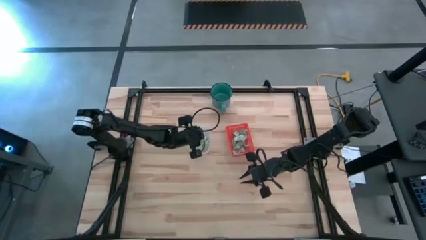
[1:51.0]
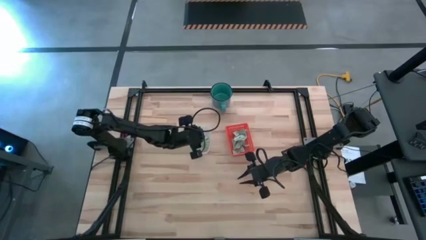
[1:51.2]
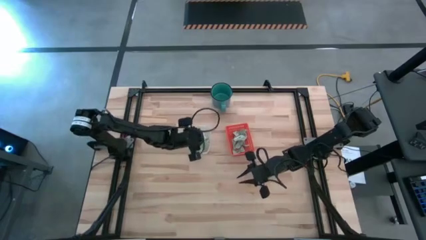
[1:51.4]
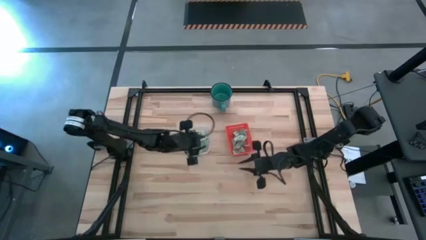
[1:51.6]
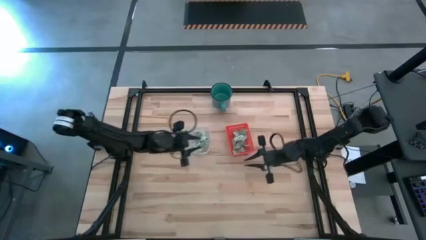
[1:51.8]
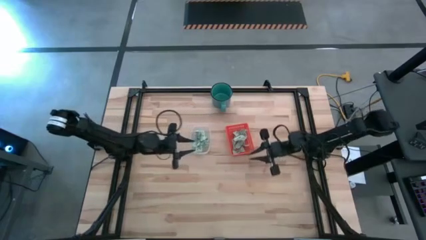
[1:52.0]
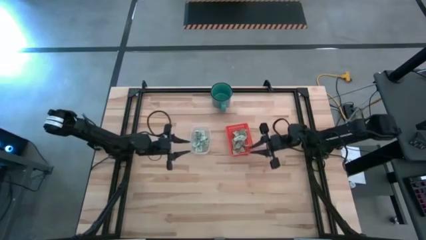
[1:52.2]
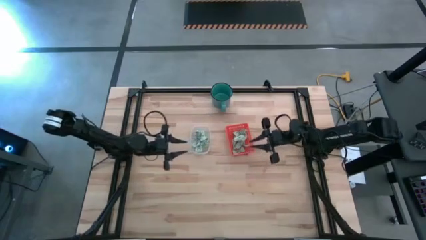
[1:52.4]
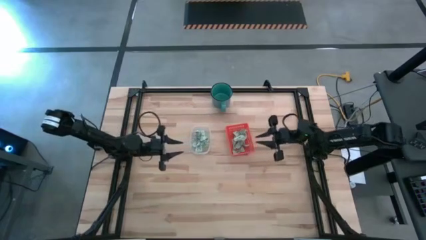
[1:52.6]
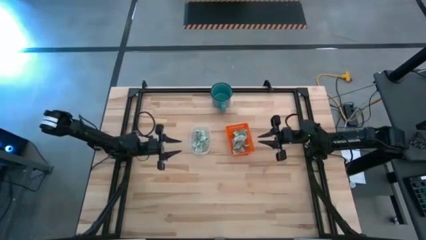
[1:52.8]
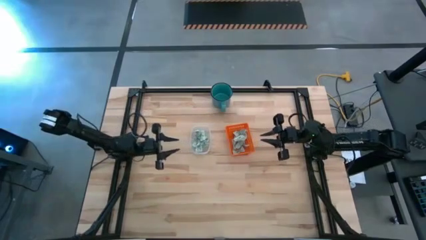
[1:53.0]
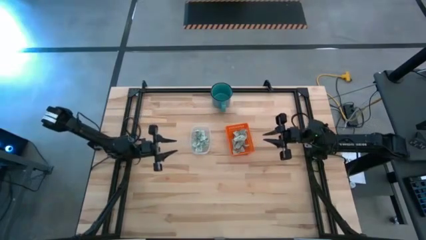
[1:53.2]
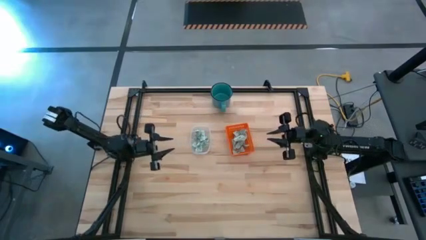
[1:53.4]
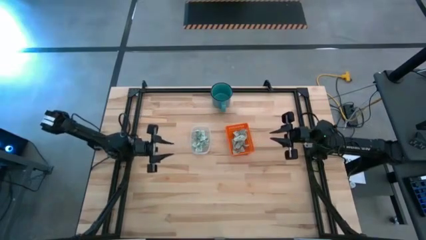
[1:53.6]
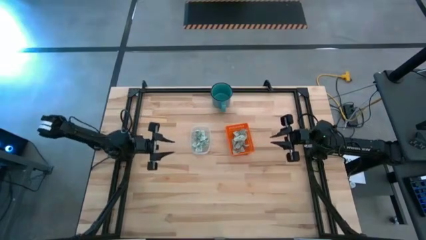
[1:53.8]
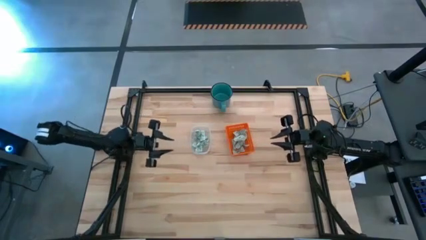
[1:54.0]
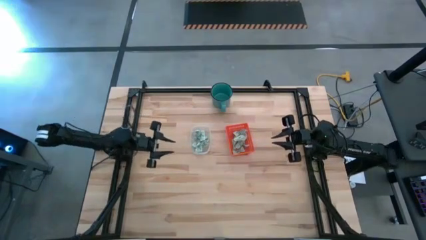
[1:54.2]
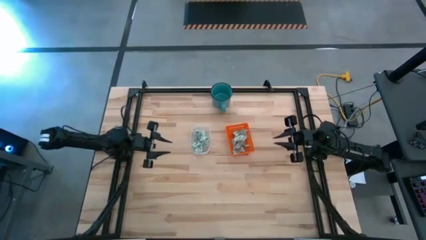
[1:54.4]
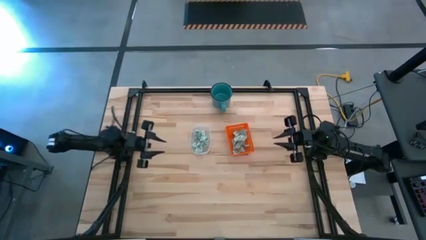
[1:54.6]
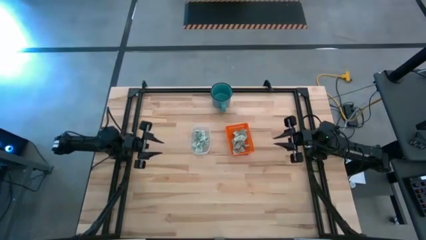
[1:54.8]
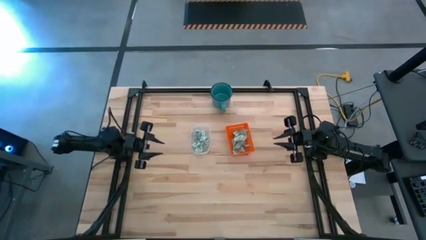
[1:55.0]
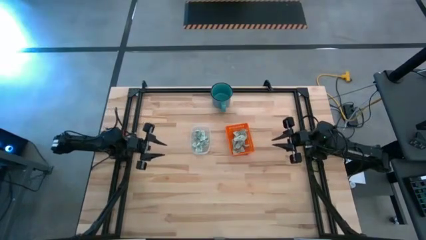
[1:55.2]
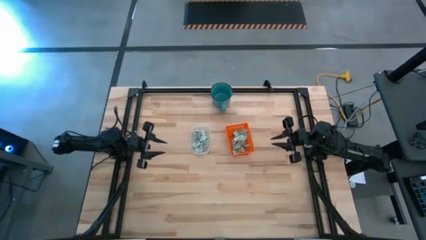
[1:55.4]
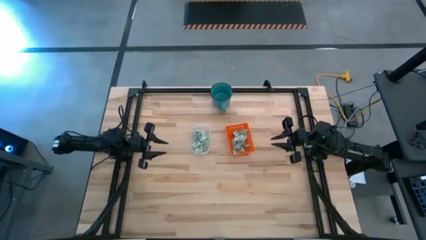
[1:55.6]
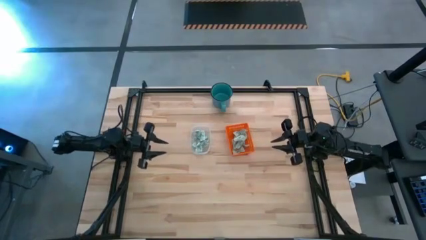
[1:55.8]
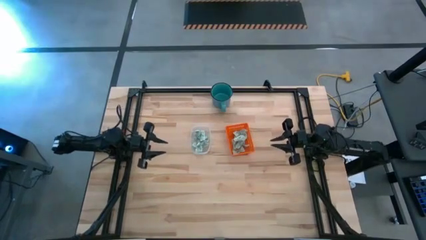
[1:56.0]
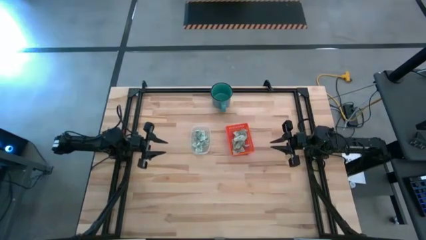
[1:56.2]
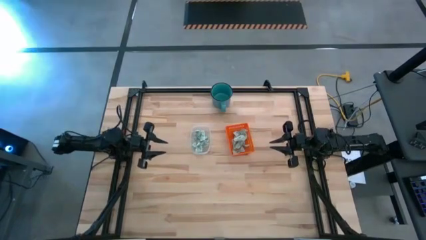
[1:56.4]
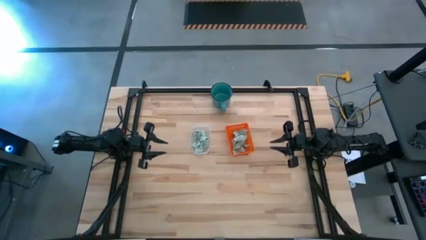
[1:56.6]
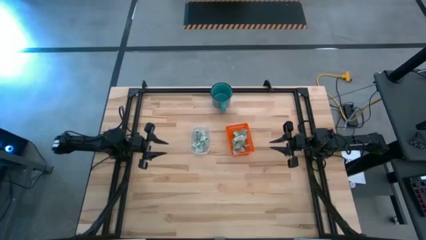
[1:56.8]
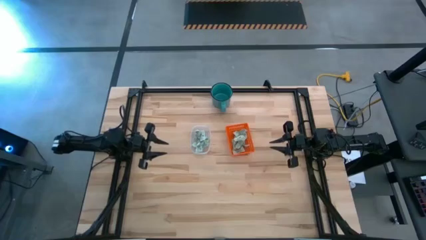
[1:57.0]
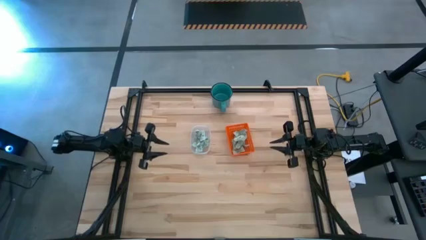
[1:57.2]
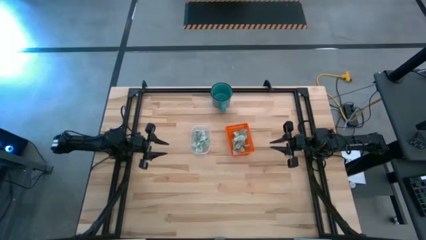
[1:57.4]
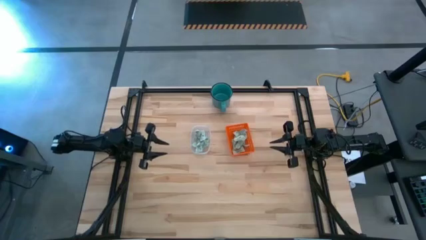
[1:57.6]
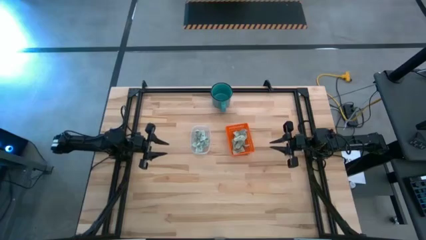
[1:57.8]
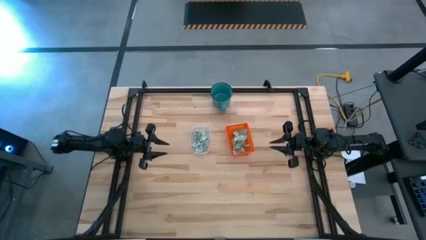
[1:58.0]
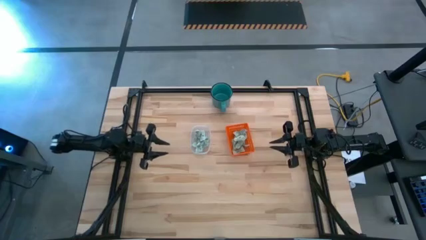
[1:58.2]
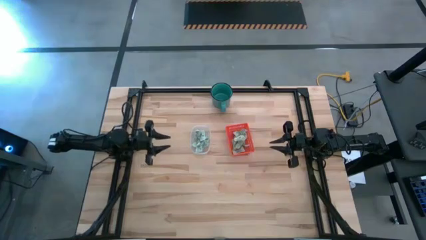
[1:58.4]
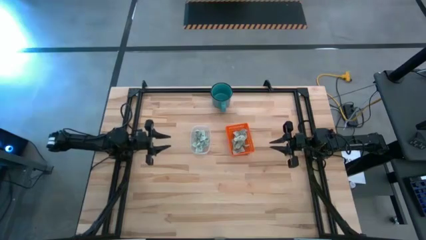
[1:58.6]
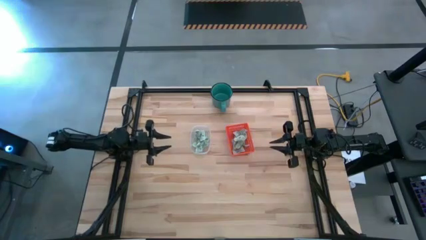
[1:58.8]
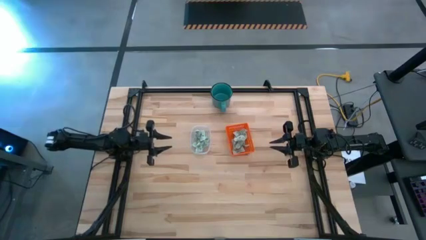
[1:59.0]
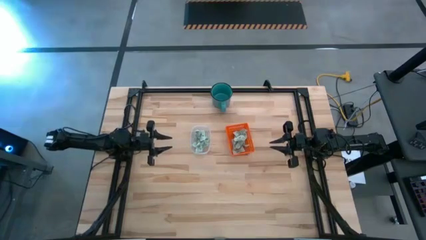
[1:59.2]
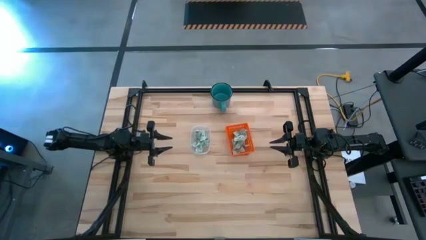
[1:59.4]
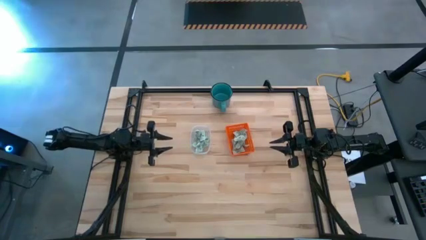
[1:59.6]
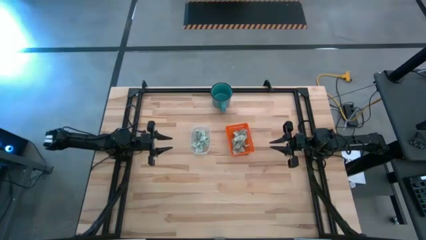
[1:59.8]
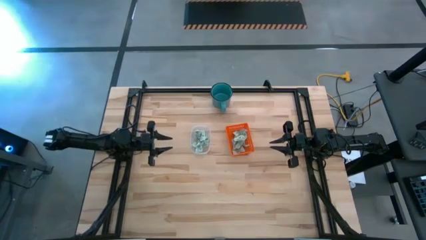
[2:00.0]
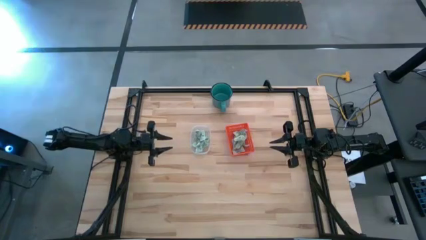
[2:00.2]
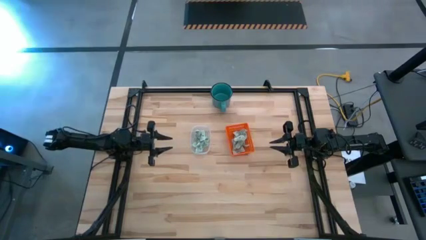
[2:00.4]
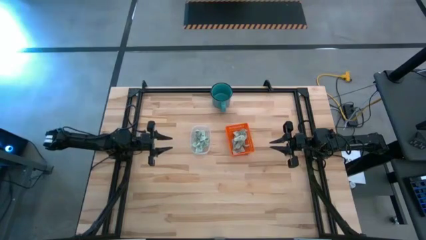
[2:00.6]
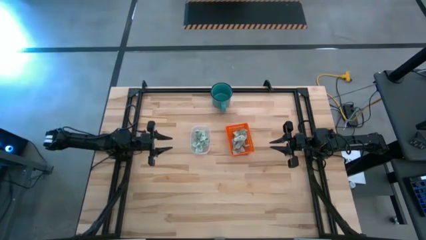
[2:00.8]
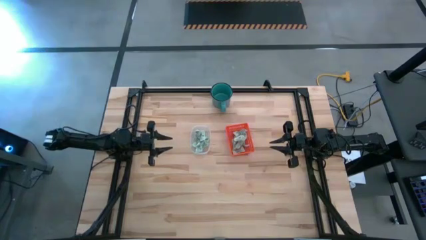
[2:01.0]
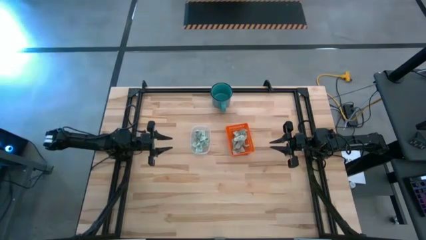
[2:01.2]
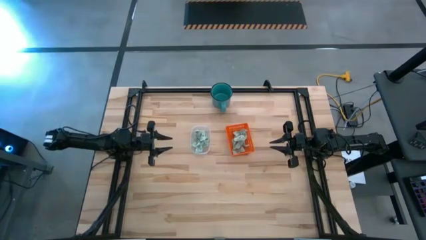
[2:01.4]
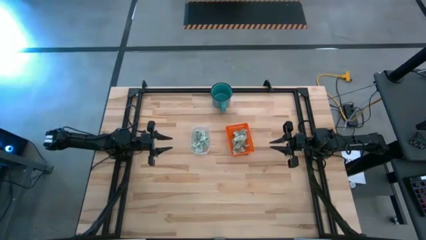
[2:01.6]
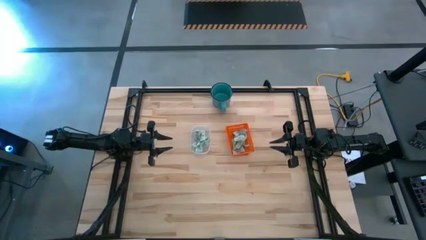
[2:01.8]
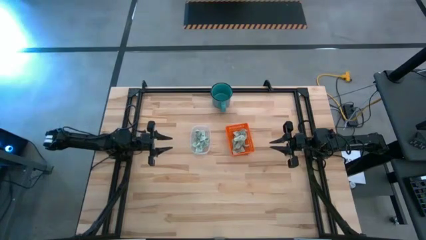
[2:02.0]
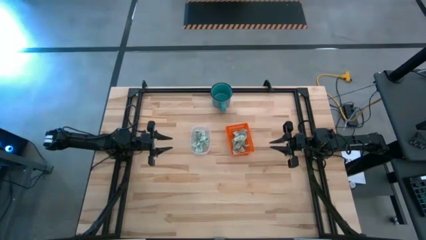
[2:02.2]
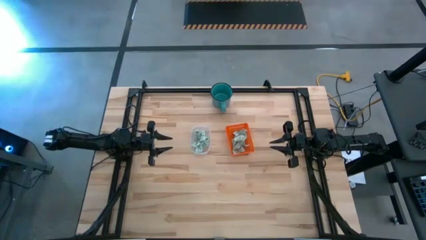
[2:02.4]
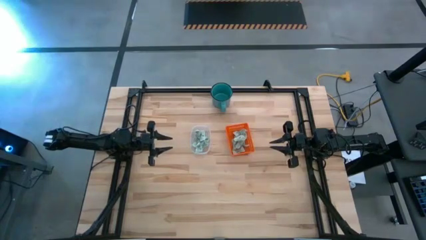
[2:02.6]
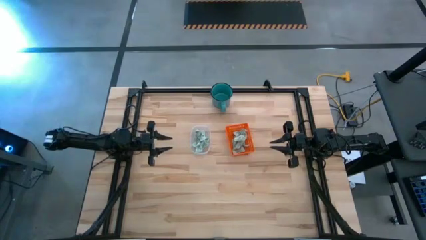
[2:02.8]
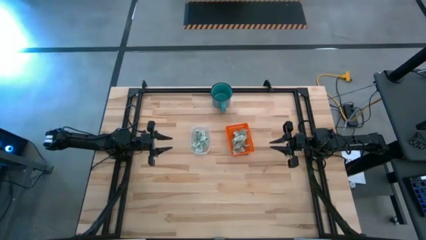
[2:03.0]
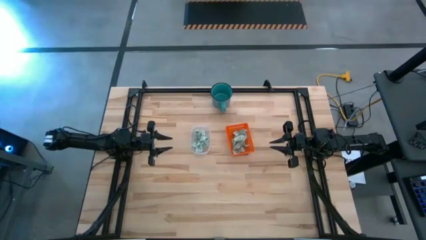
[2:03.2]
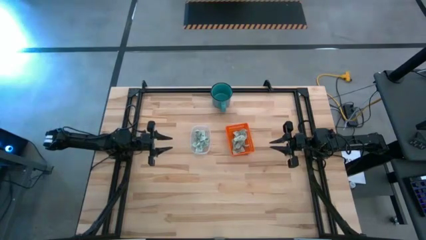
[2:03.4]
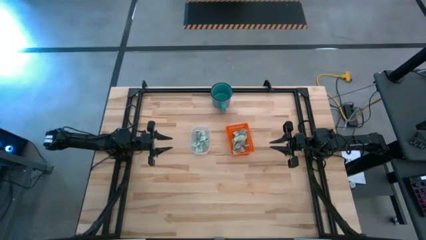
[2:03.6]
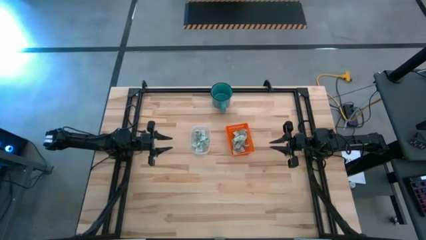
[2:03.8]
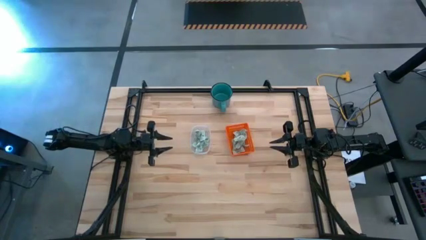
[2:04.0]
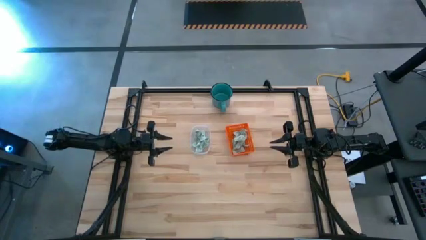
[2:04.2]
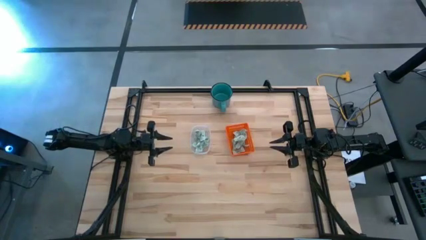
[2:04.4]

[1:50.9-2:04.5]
Task: Pick and place items into bin
Return to Home Position

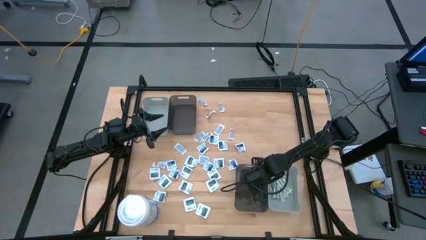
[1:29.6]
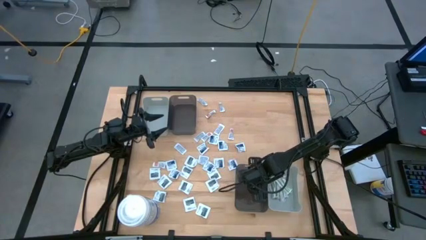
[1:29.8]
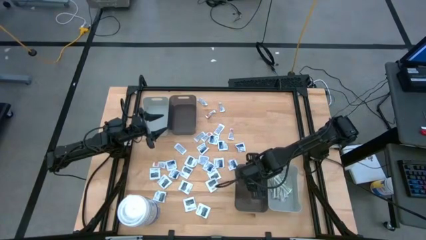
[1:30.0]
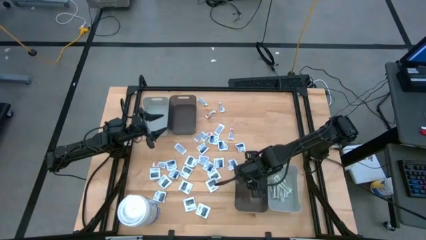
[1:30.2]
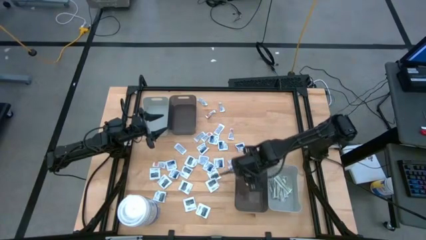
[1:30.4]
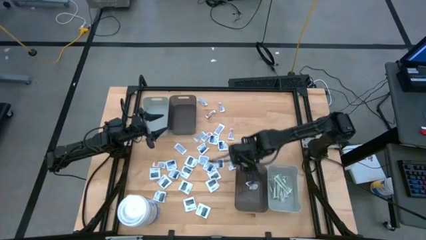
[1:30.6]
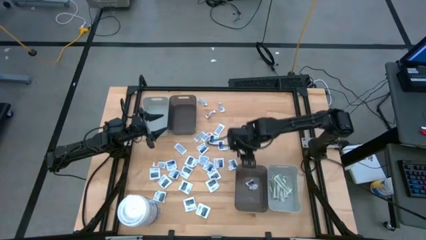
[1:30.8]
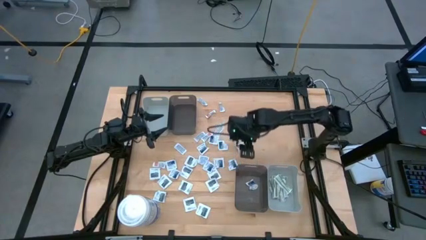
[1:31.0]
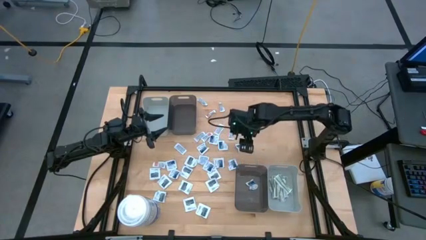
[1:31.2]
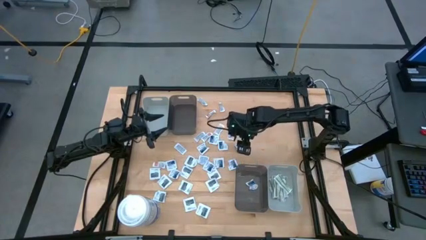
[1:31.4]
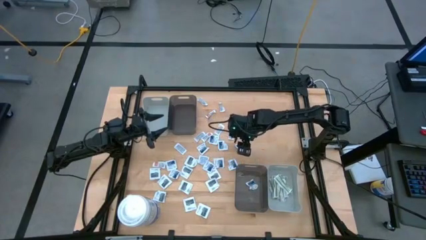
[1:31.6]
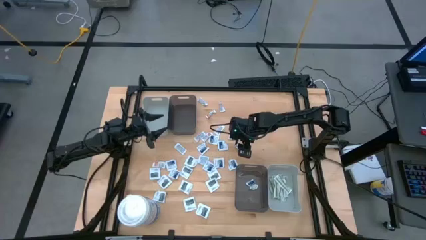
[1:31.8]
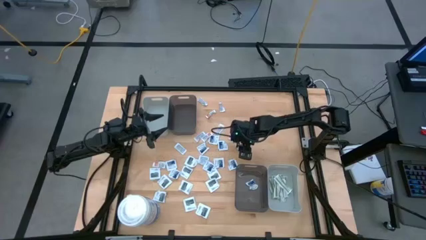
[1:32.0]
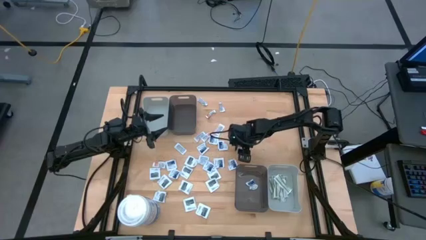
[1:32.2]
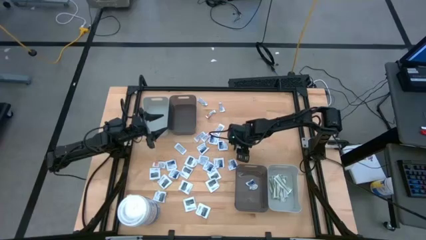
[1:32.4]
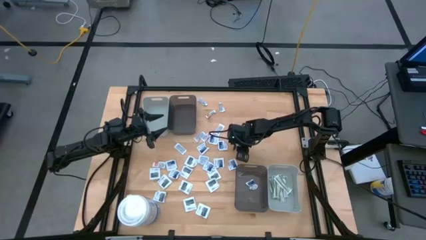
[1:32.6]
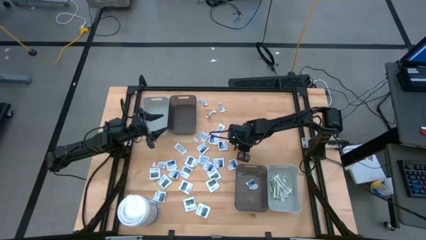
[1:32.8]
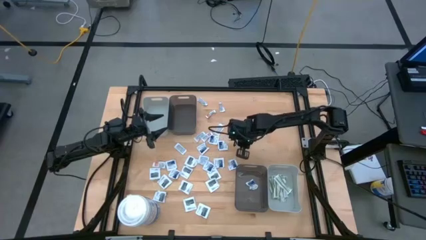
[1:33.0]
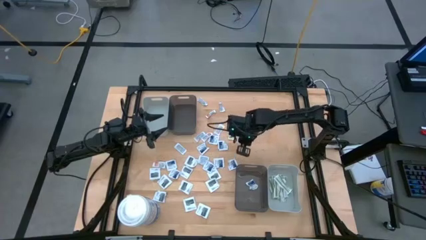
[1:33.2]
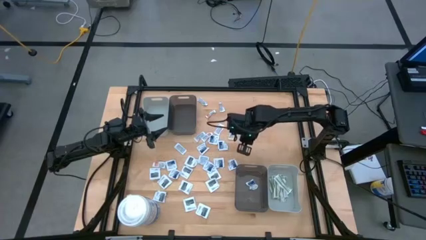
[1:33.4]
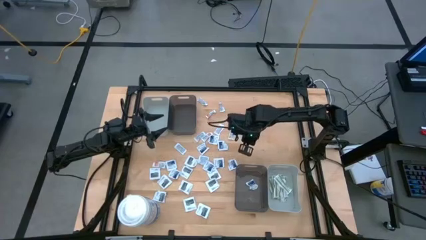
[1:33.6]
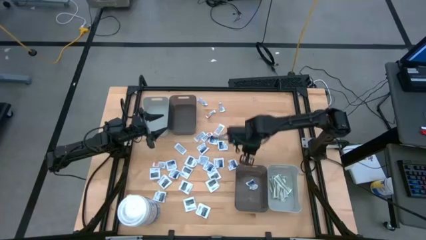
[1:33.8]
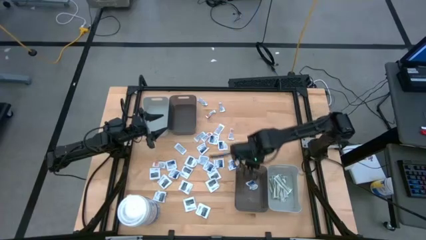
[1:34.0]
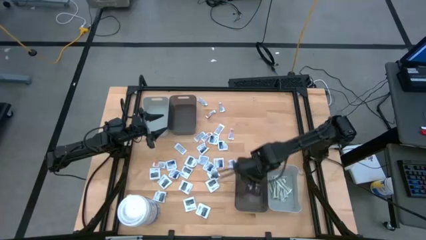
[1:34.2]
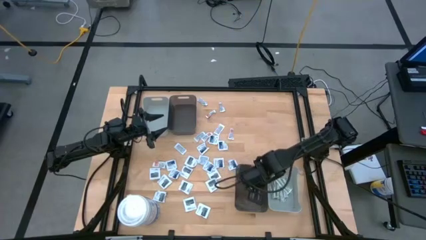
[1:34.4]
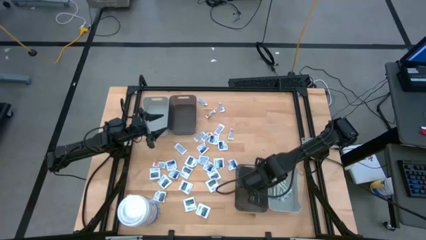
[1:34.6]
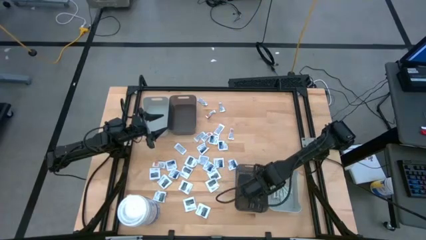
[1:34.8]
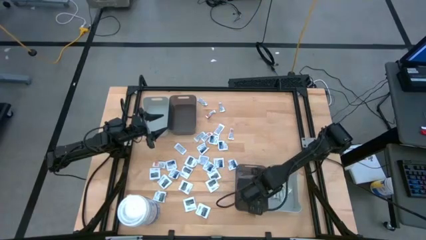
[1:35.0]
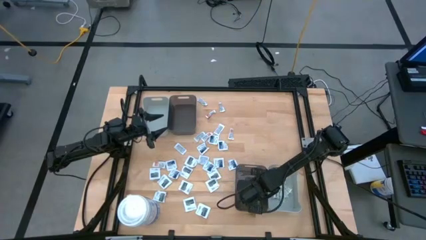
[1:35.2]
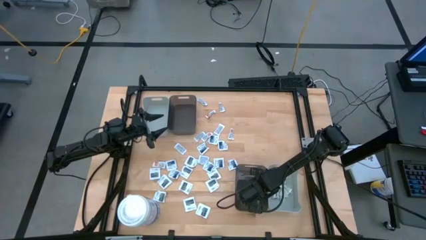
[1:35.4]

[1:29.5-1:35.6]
Task: Pick & Place First Aid Supplies
Put the white alcohol pad into the bottom black bin
